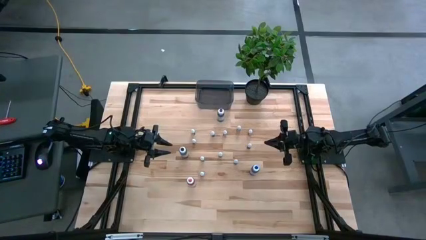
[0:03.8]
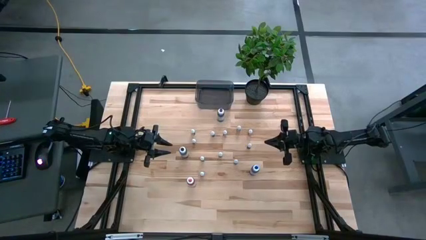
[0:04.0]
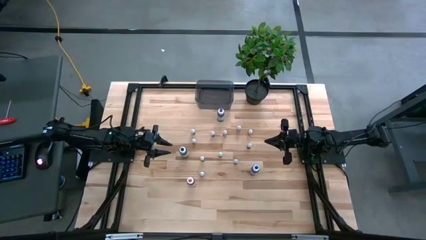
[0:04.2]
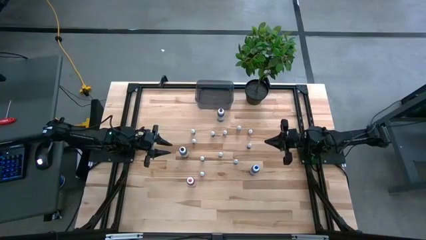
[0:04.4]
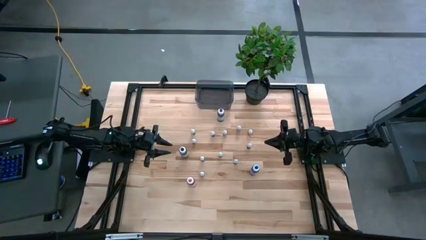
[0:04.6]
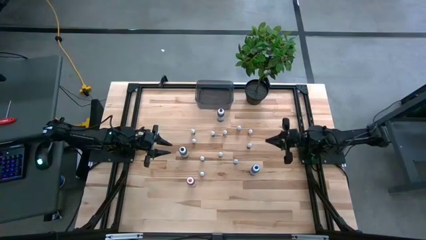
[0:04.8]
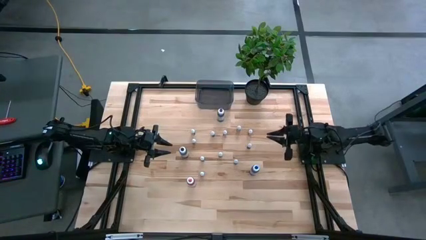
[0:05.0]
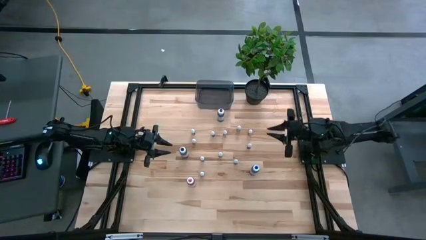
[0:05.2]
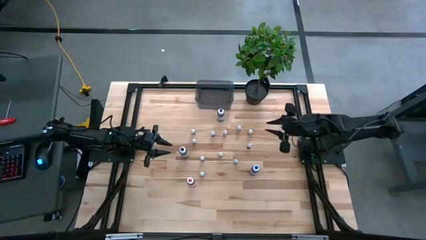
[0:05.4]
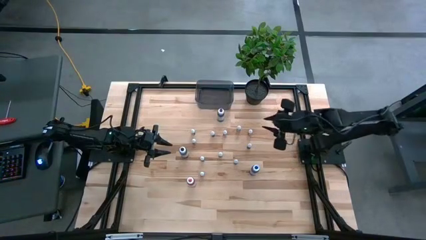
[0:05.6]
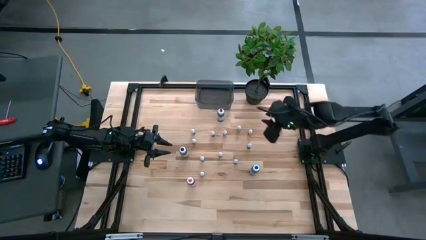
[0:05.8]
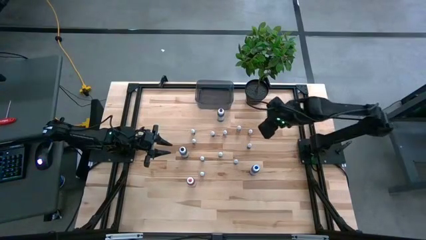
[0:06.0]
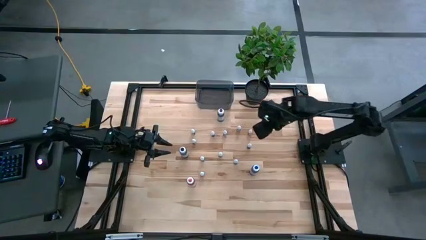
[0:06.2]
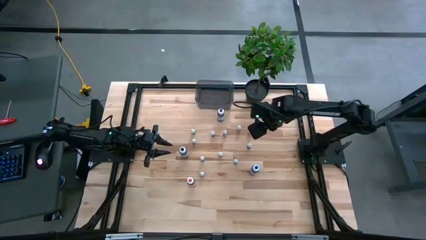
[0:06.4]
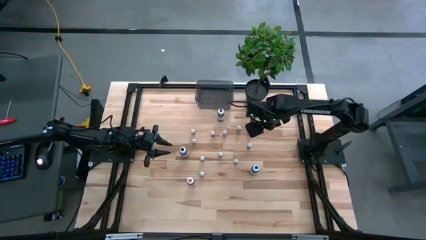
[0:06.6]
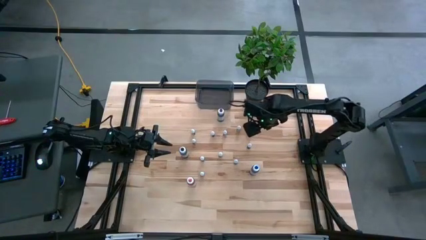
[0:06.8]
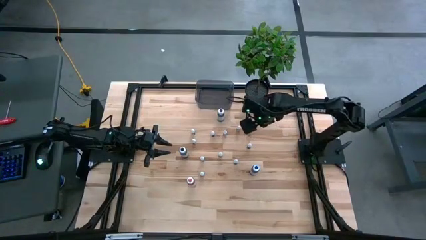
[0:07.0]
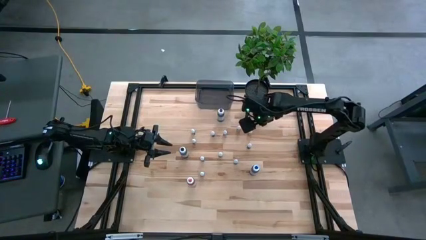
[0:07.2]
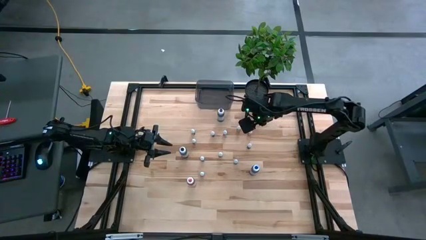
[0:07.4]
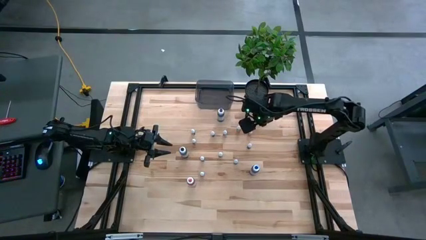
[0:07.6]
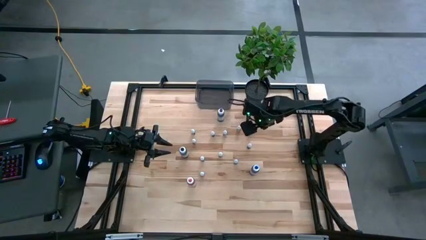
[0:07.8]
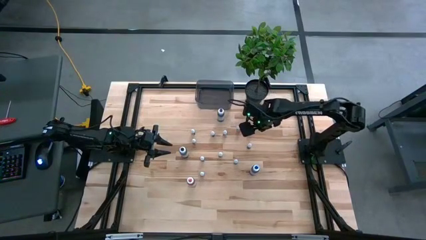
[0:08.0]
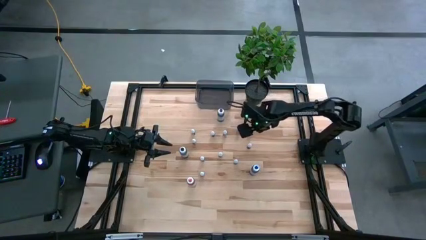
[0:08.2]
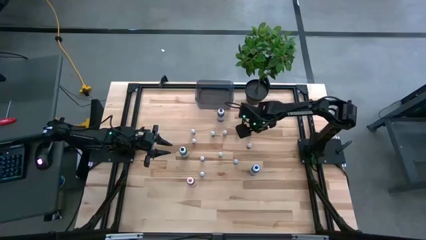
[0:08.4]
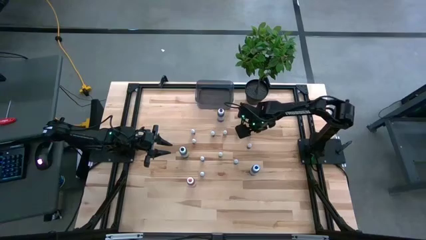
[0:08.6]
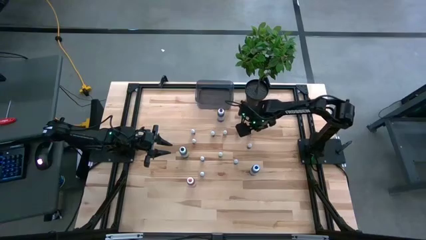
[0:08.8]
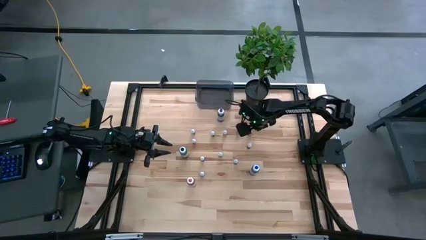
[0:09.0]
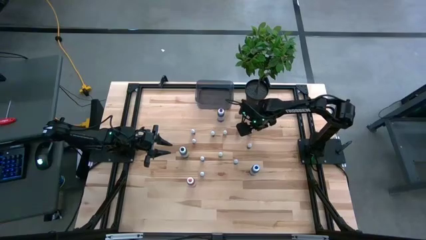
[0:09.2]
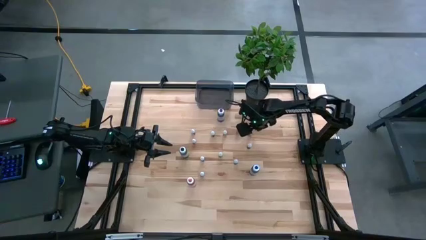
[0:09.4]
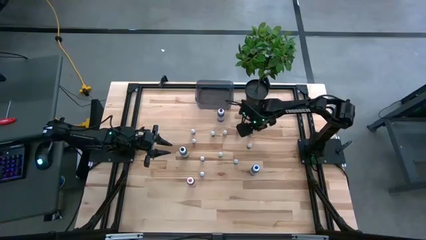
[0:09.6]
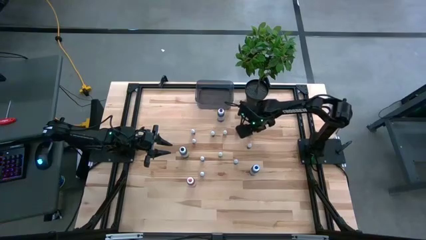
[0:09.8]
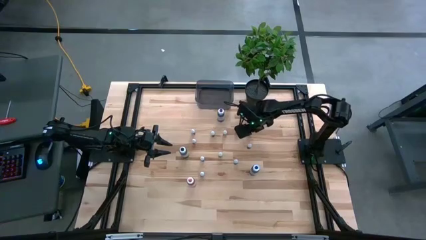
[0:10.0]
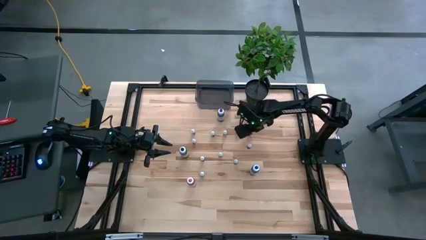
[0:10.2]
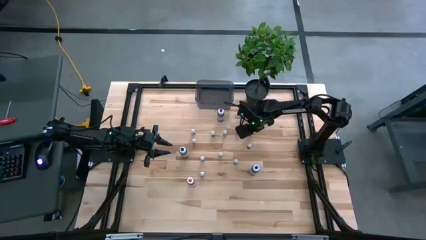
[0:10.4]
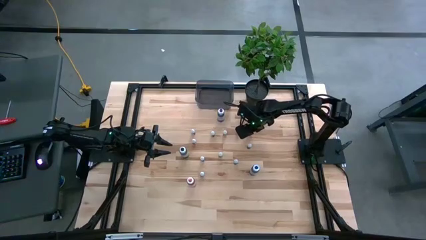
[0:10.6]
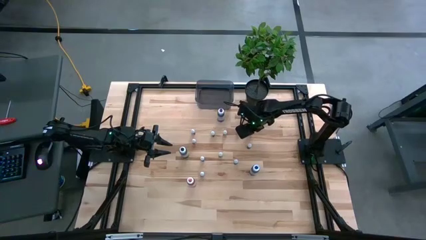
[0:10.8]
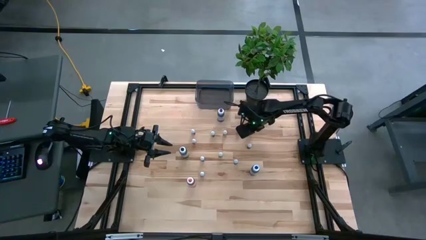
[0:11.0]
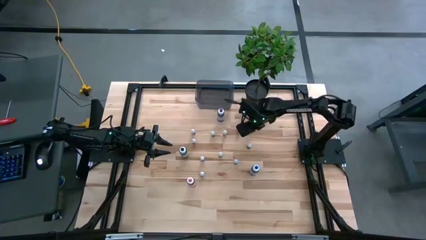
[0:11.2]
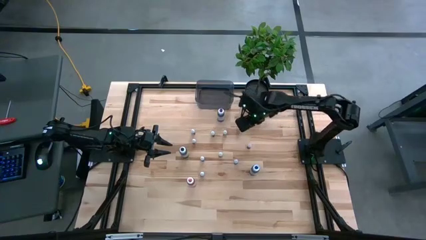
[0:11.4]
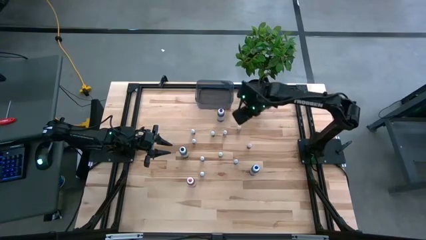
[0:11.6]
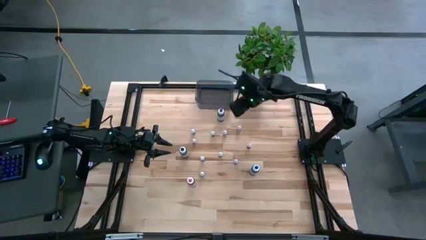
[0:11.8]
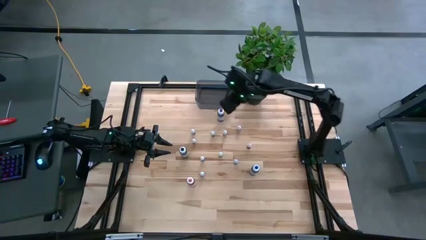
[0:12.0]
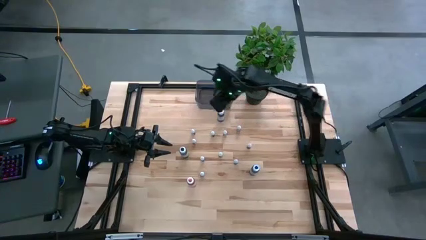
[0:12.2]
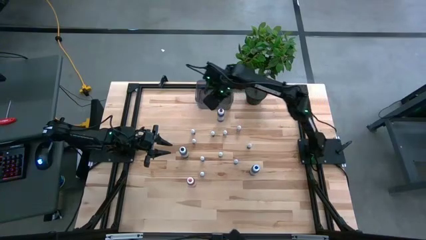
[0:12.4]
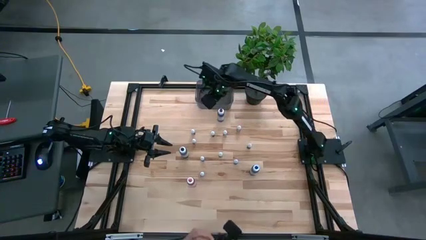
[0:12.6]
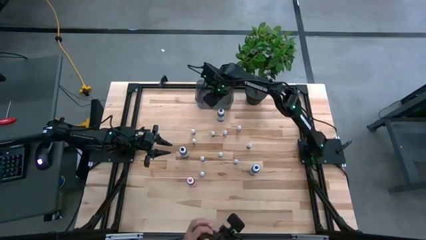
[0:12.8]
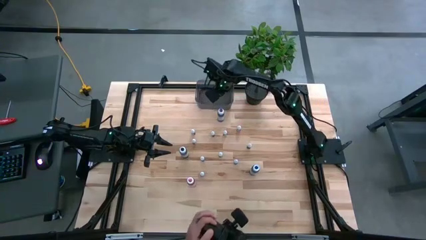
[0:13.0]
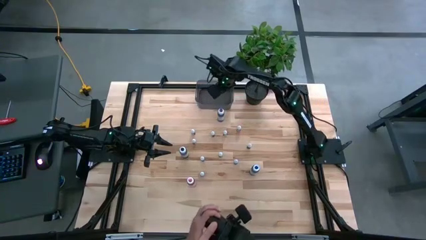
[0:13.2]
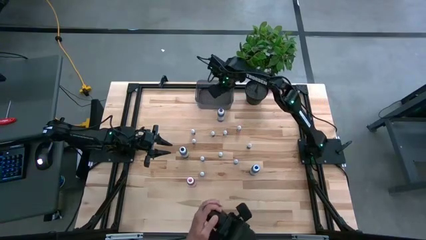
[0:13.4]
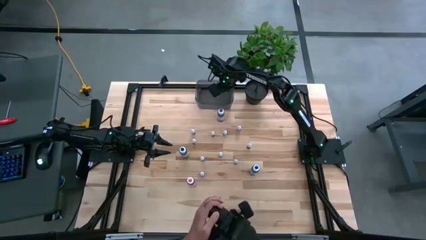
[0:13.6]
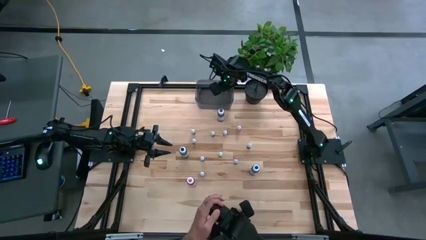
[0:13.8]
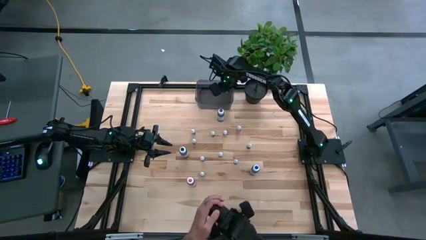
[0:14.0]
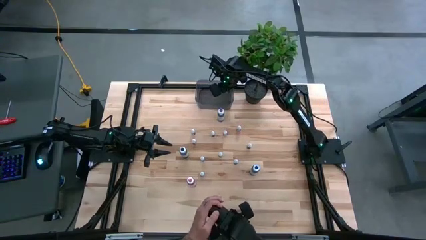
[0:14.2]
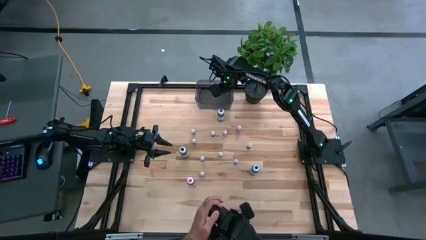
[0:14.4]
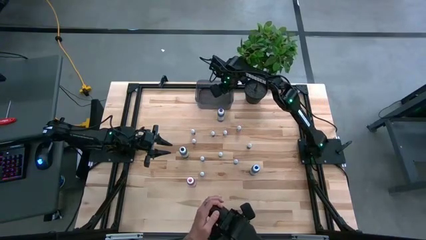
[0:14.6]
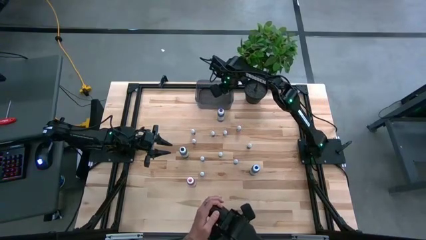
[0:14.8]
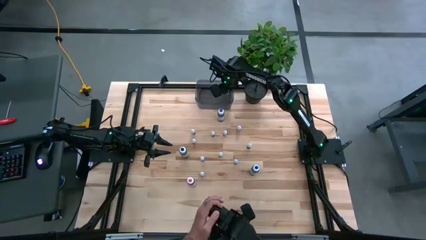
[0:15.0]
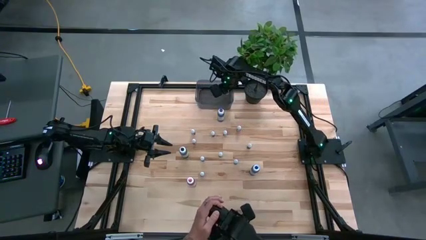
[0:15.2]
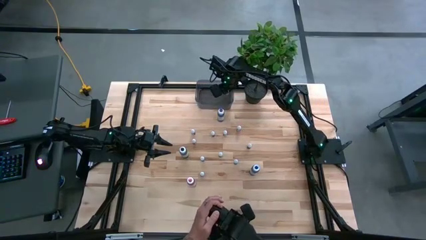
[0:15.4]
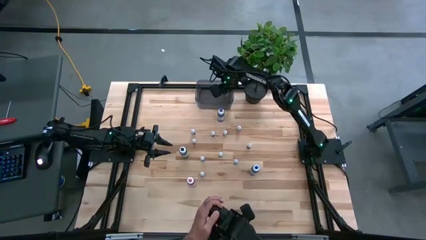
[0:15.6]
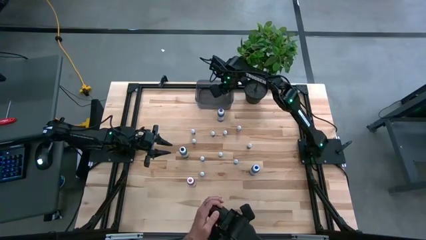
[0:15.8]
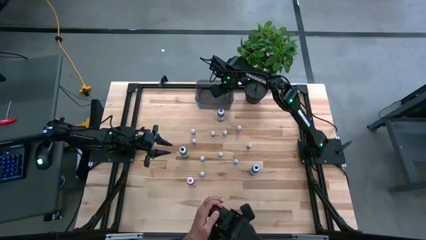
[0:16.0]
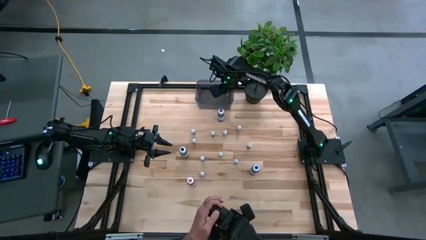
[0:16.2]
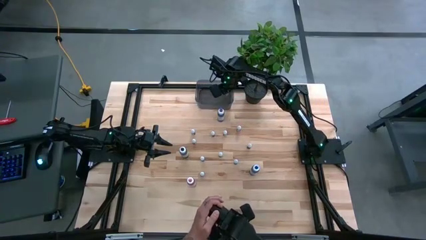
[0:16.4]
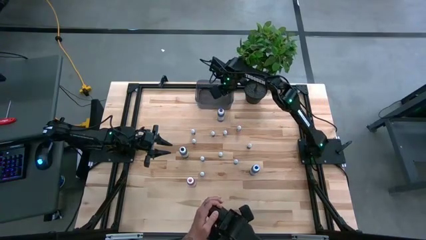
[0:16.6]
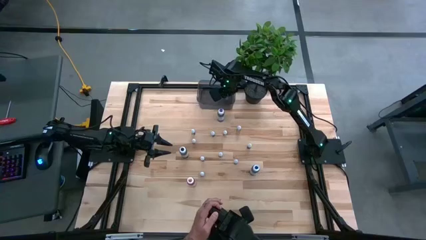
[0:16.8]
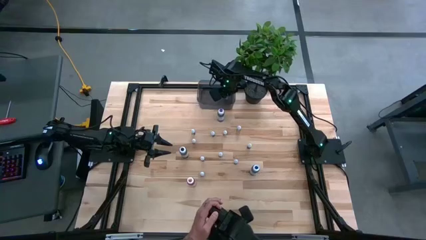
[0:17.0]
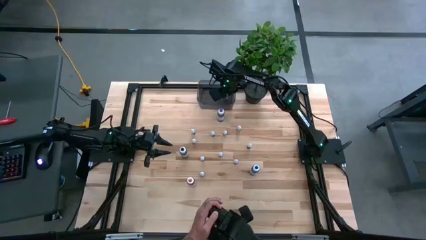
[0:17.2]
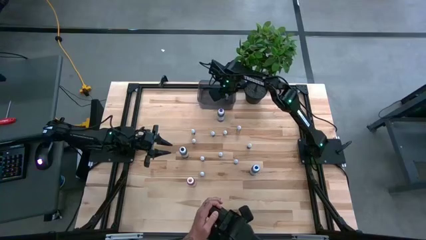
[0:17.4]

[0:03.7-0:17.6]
Task: Pick & Place food coloring
Put the small orange food coloring bottle into the black bin
